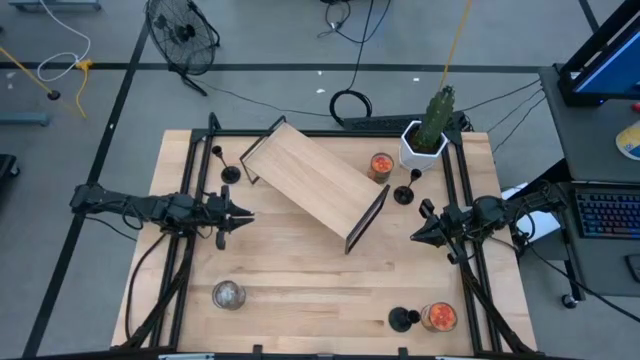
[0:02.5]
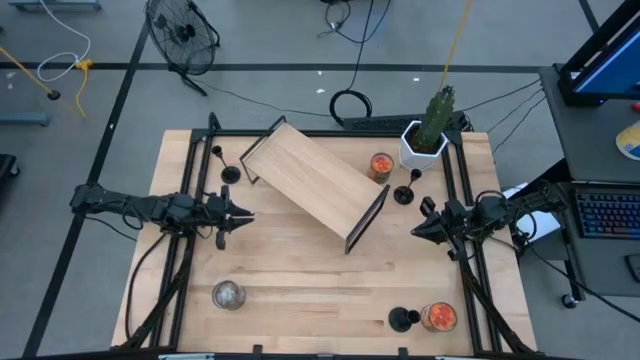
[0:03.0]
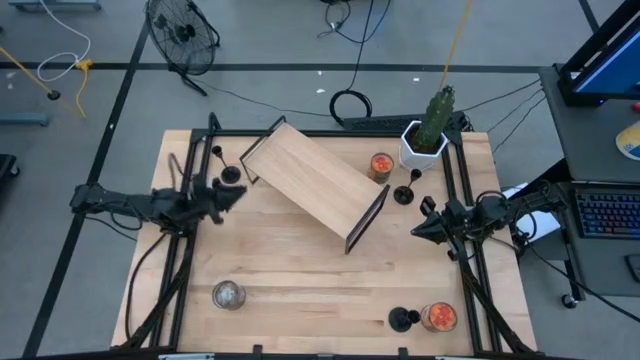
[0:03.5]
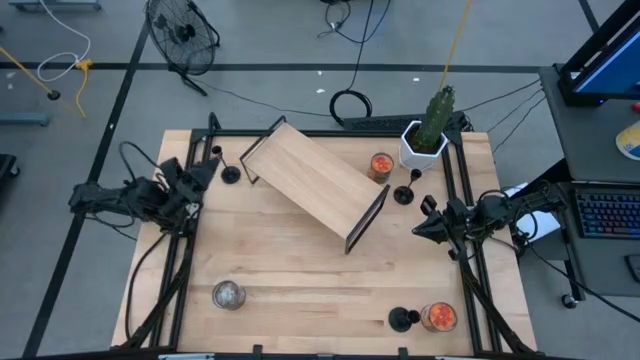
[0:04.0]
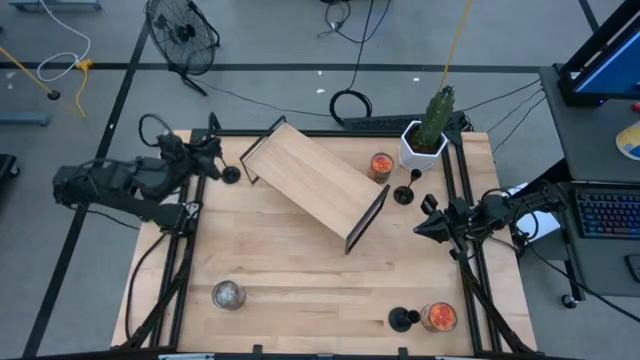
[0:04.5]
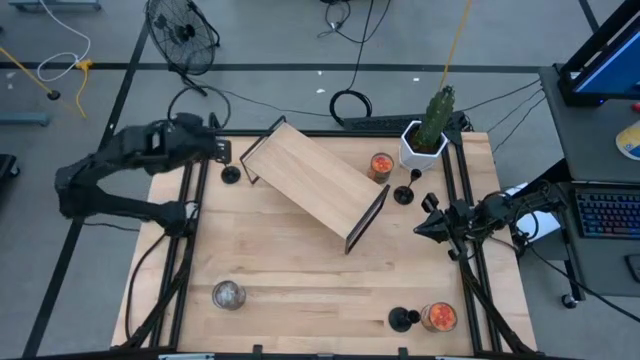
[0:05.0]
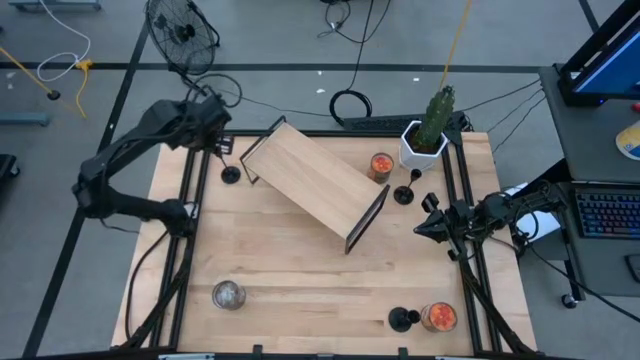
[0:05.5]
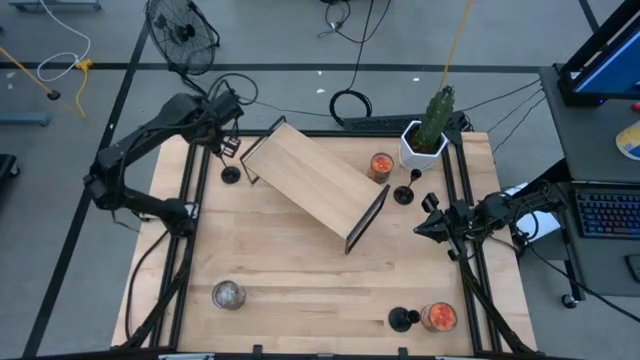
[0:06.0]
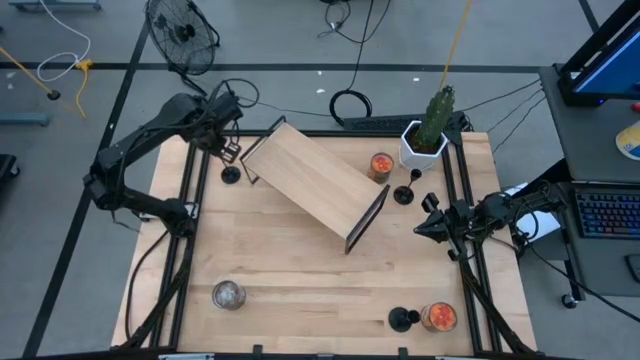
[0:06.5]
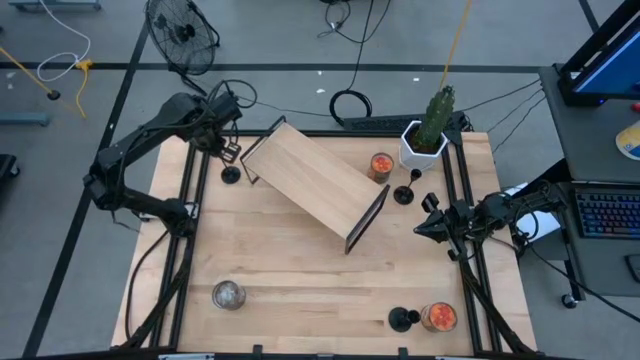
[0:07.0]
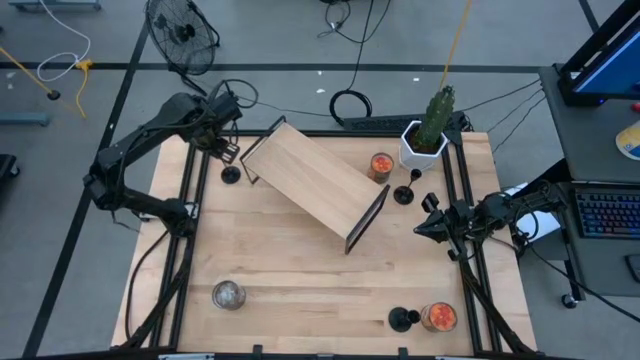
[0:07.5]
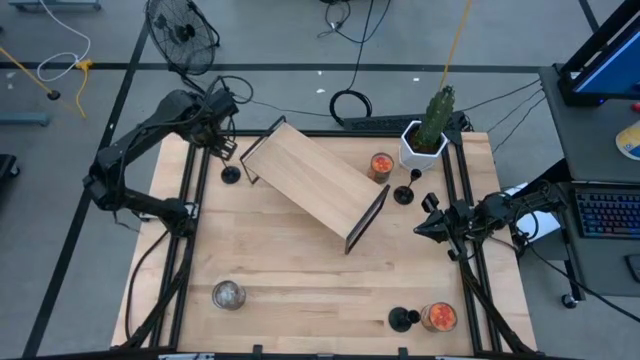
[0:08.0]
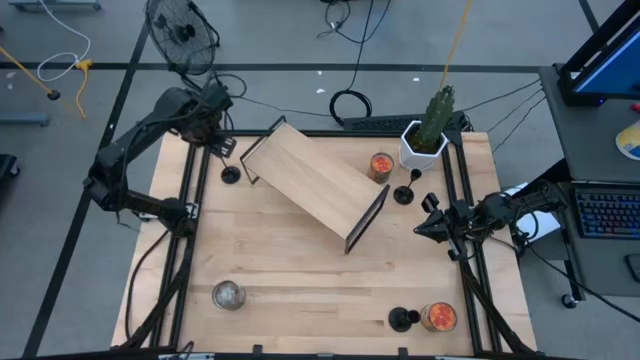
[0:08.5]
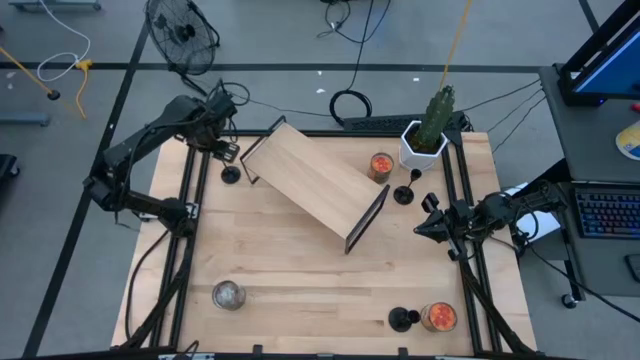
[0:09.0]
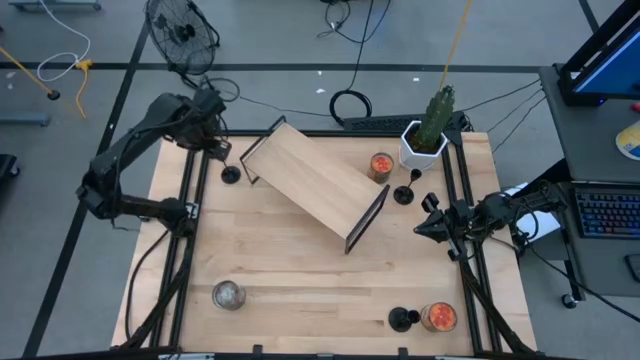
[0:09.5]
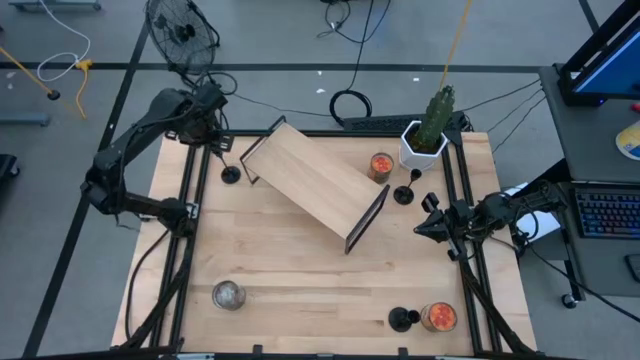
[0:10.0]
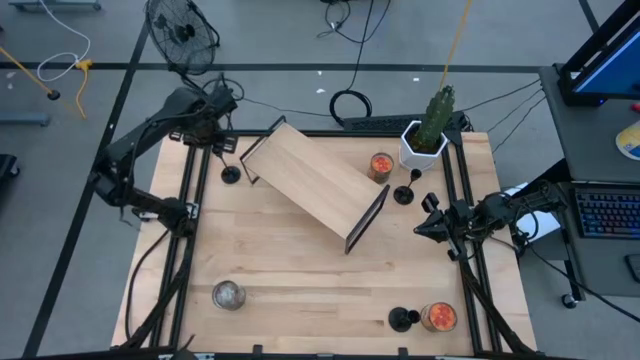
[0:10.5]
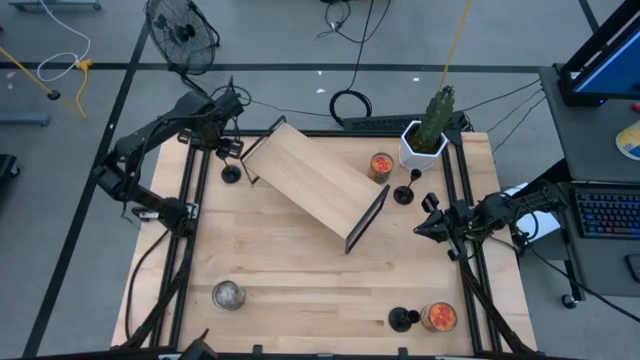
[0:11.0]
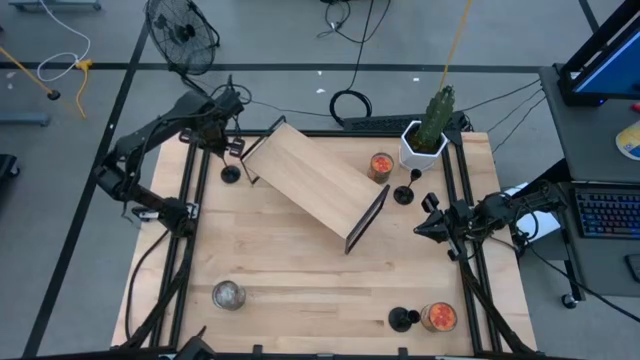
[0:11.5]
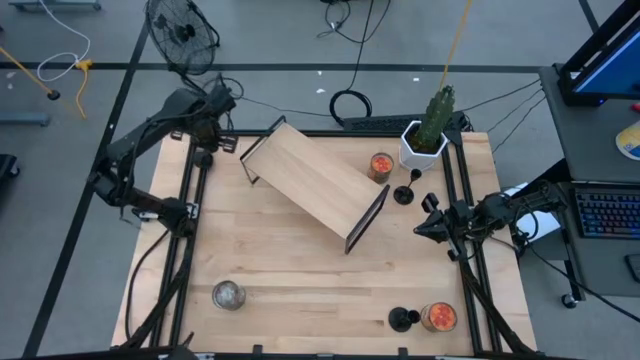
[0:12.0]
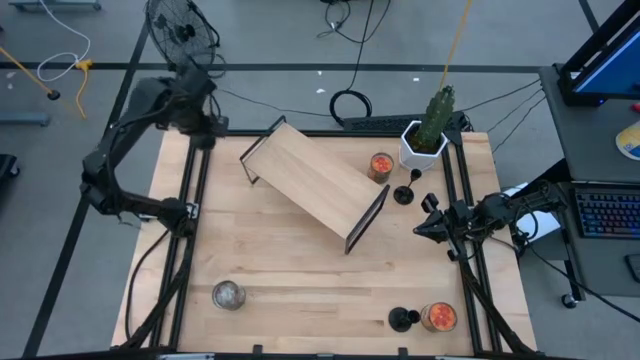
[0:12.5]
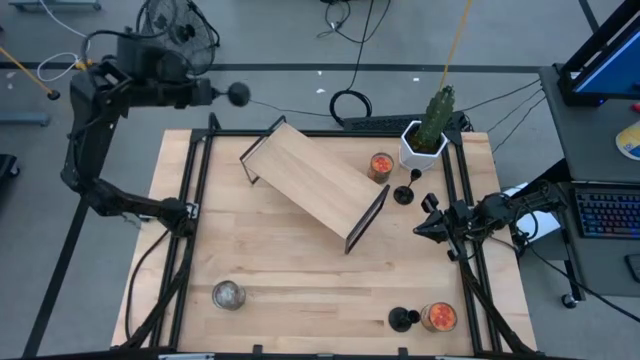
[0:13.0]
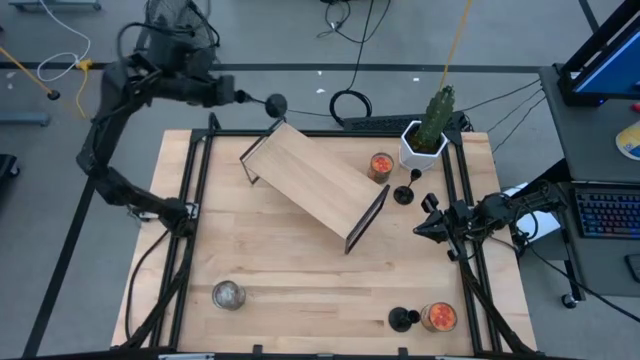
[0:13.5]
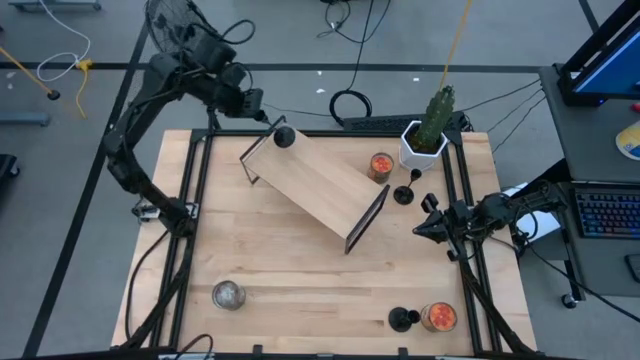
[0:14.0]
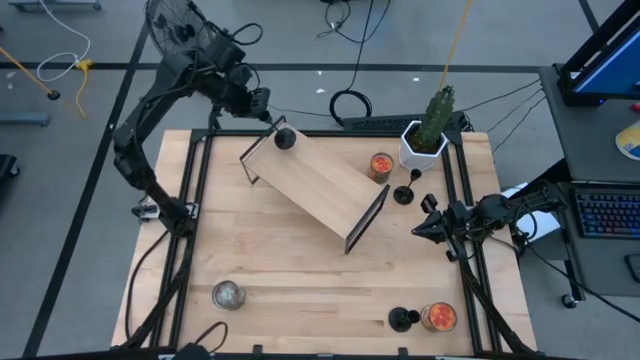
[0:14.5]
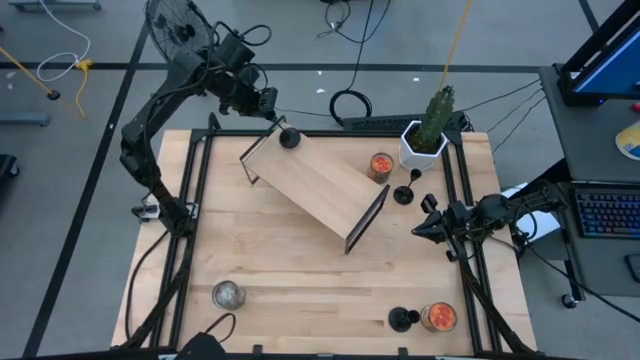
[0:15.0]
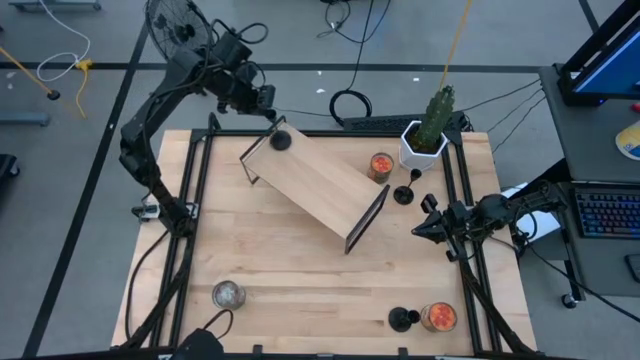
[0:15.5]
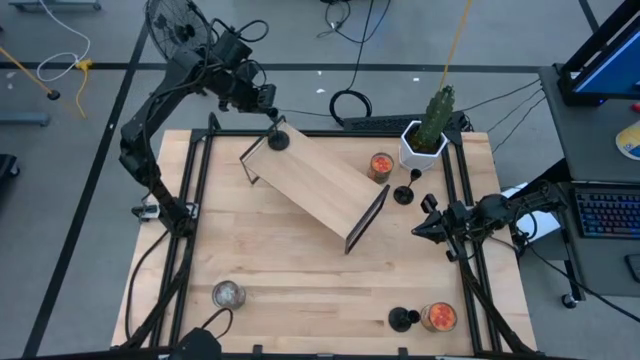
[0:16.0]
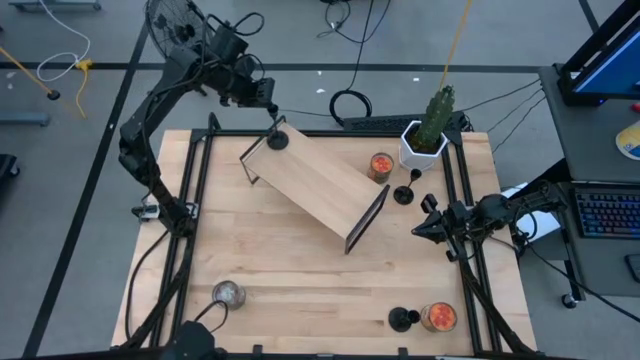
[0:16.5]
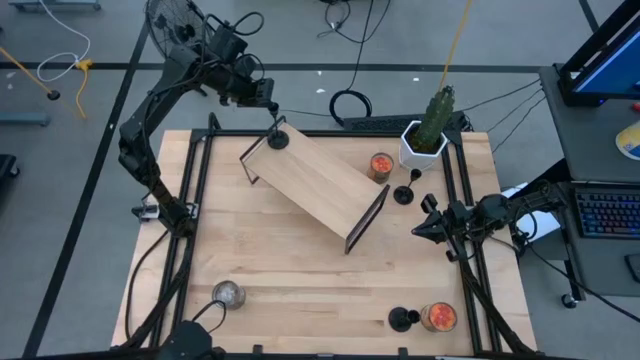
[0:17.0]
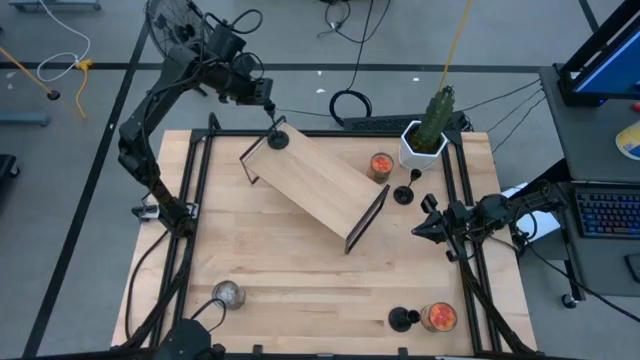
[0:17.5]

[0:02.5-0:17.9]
Task: Pick & Place candle stick holders
Put the left candle holder on the shelf

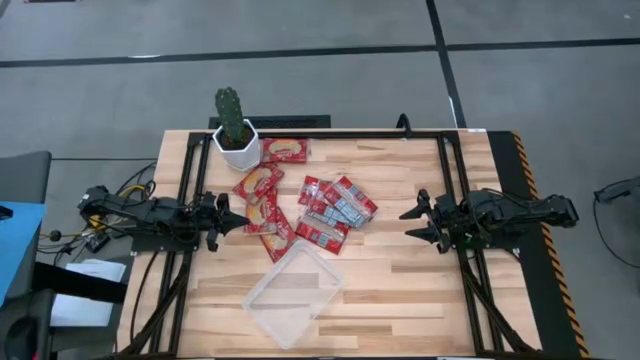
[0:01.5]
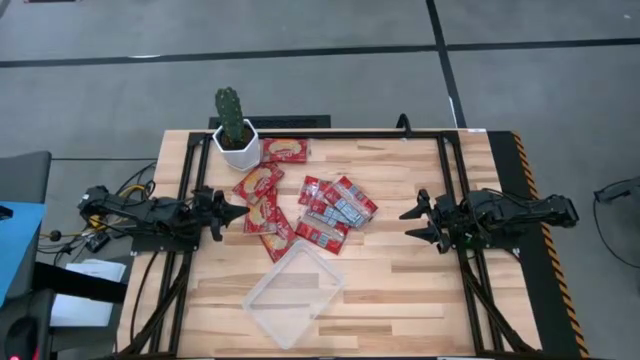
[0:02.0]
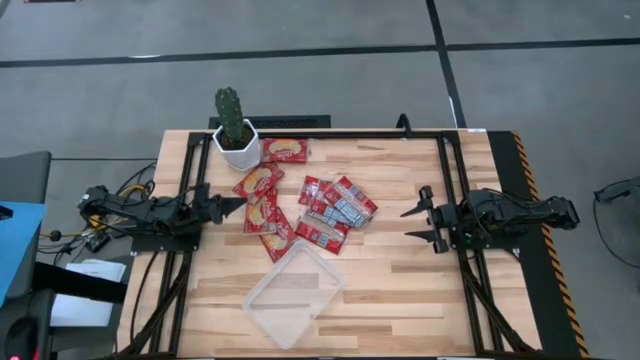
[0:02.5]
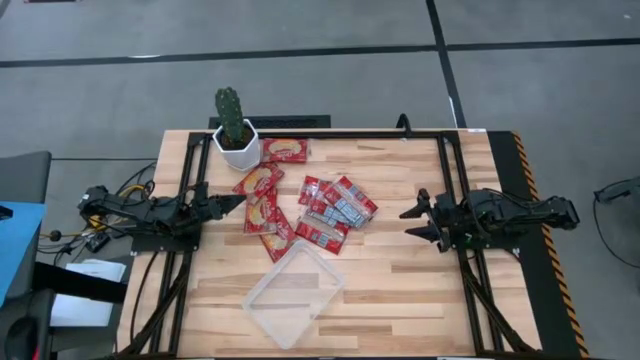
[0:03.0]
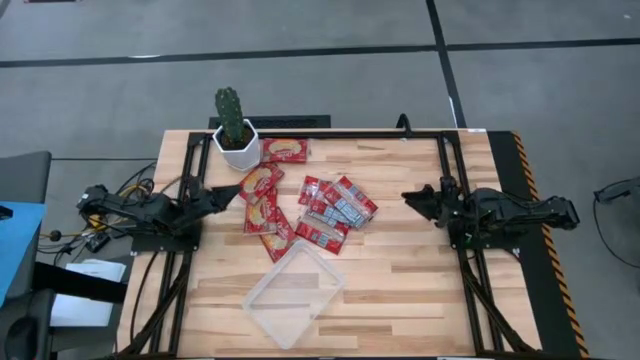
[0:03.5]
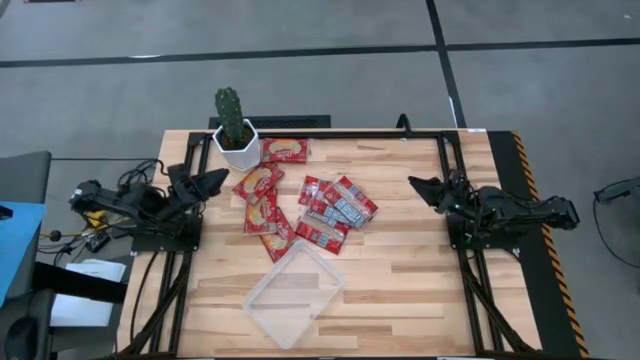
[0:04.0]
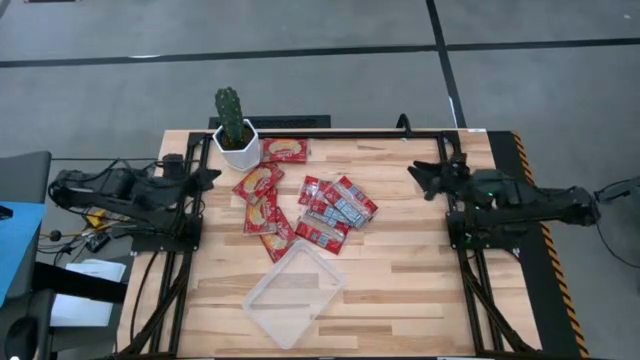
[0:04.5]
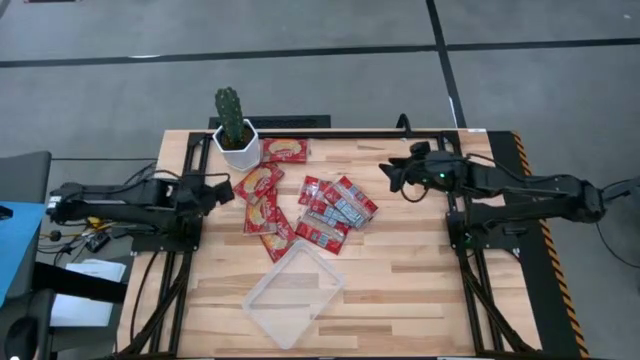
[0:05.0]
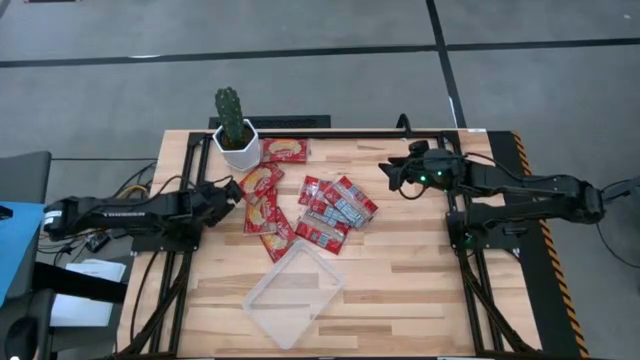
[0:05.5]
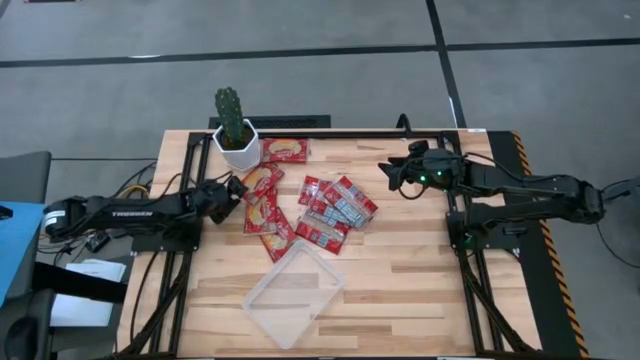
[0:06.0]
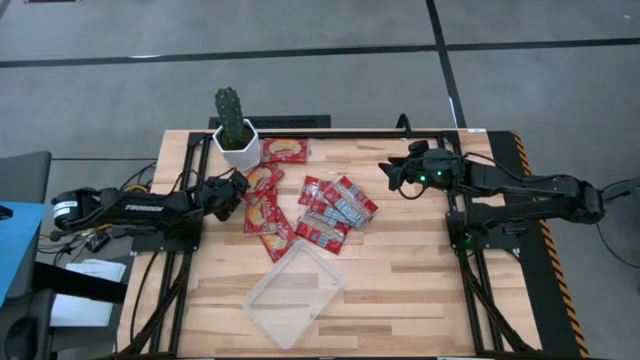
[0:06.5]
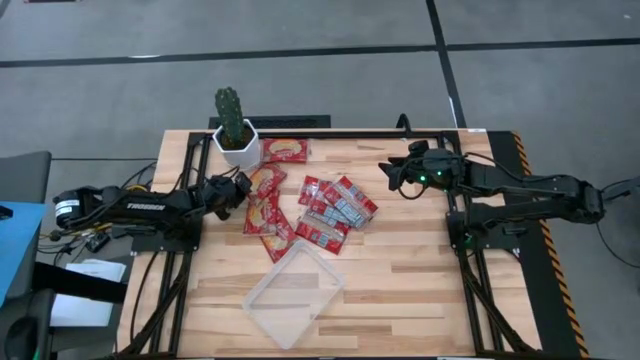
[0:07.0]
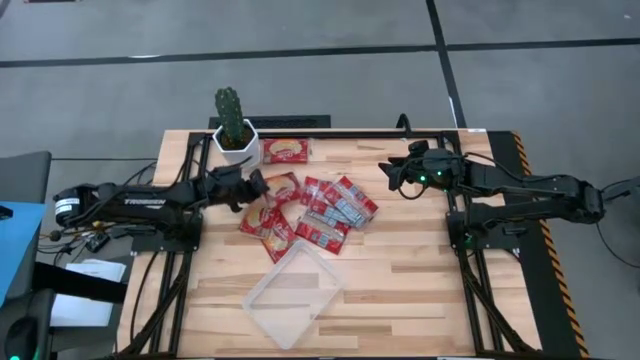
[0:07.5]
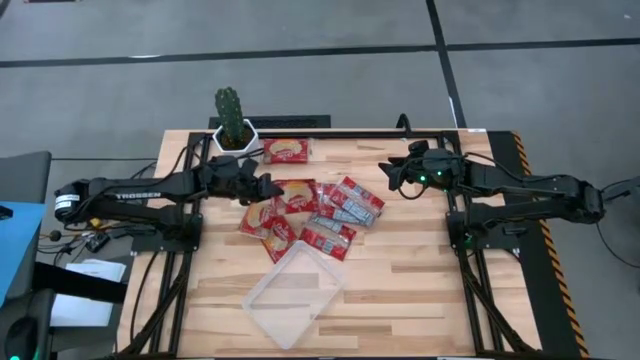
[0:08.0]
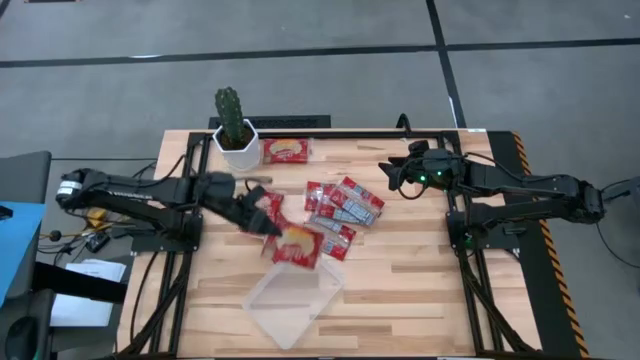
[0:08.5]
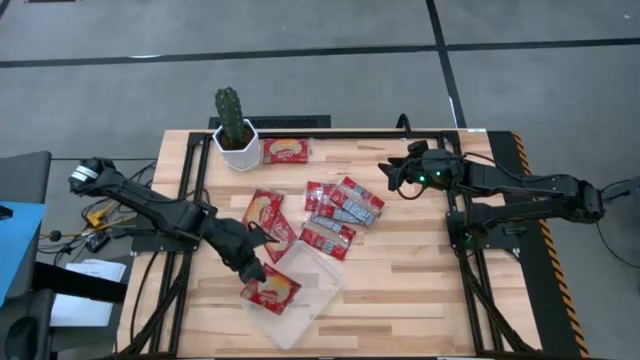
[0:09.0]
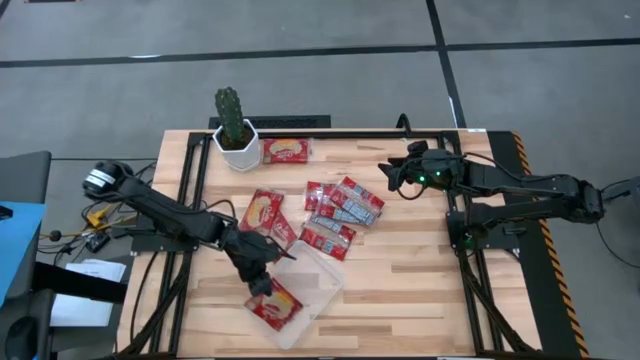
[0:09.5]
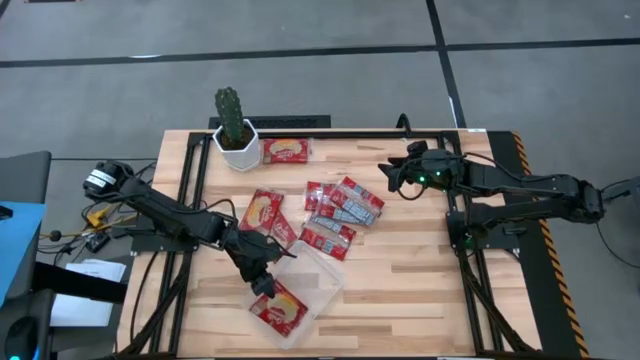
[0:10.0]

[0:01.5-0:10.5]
Task: Sort popcorn bags into baskets
Put the red popcorn bag into the transparent bin
